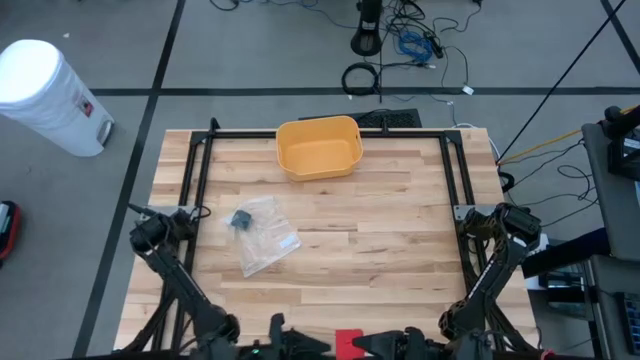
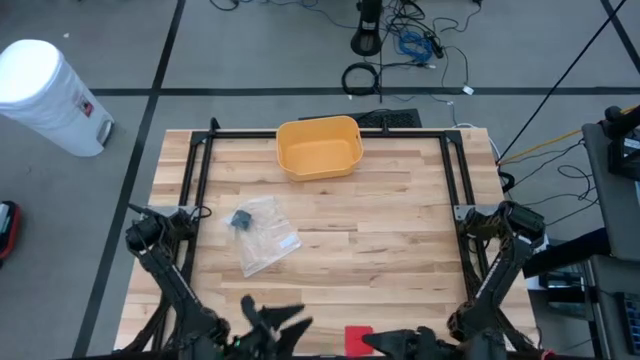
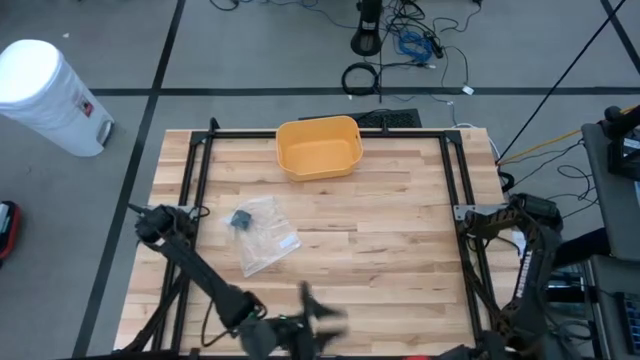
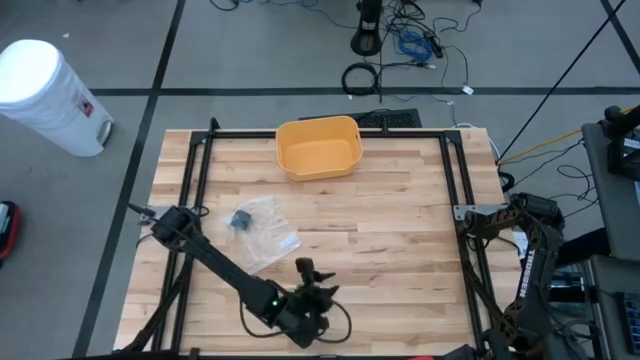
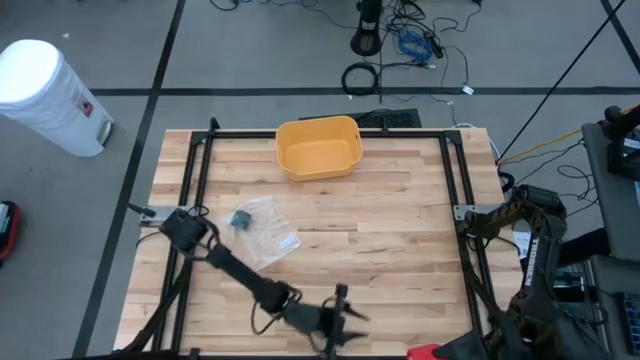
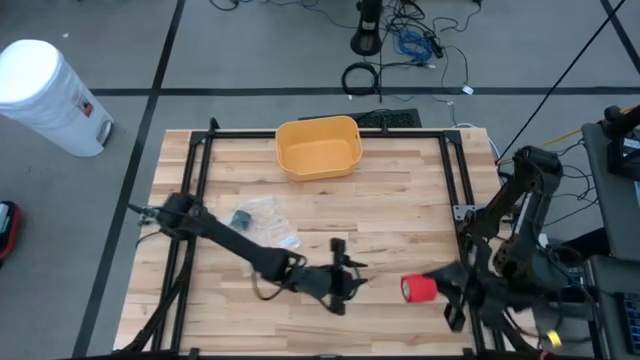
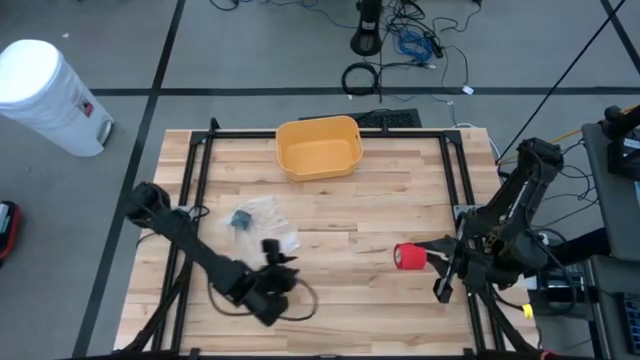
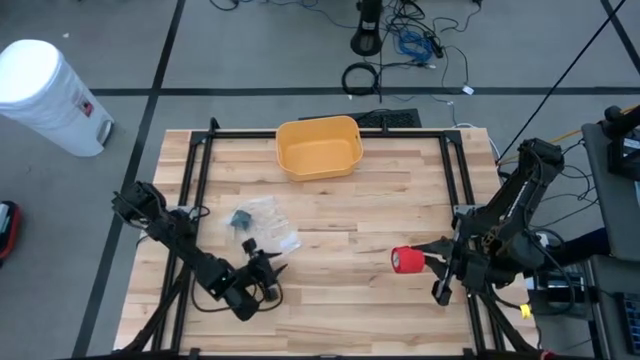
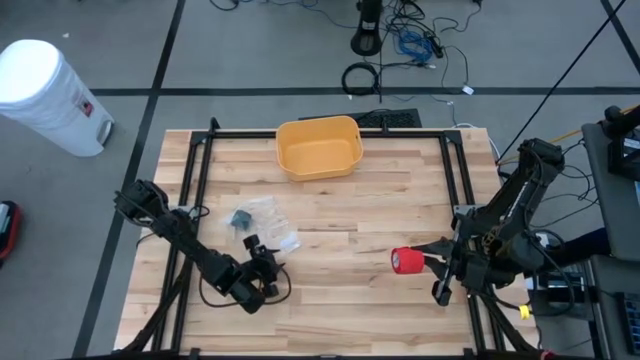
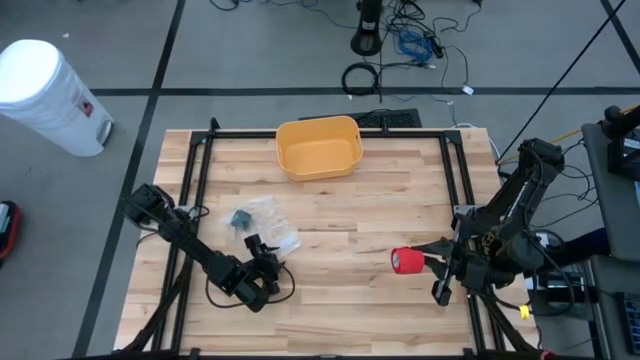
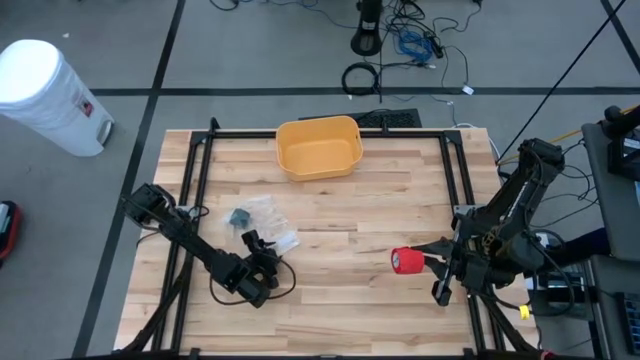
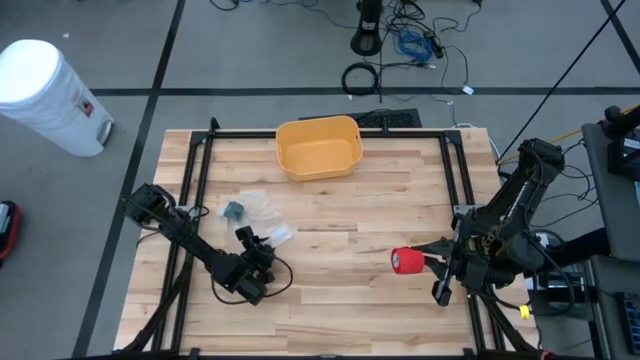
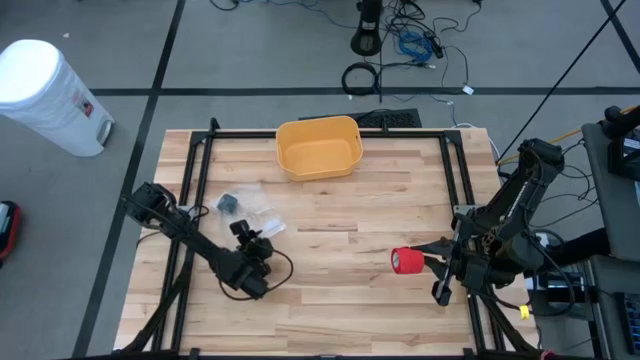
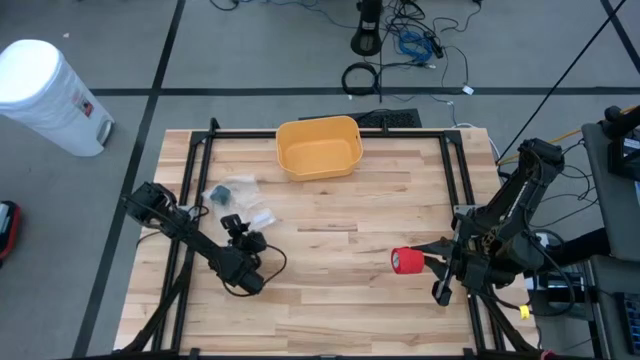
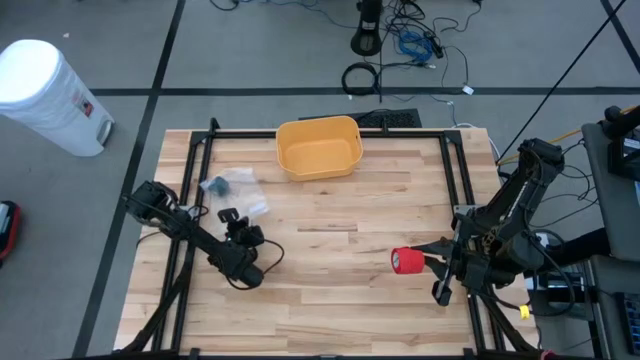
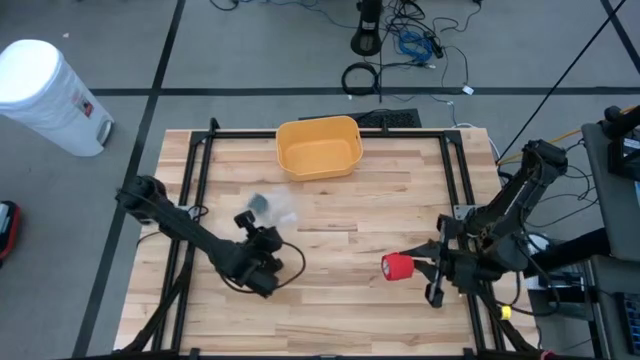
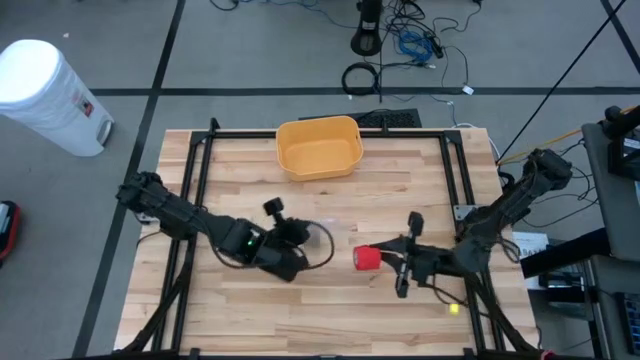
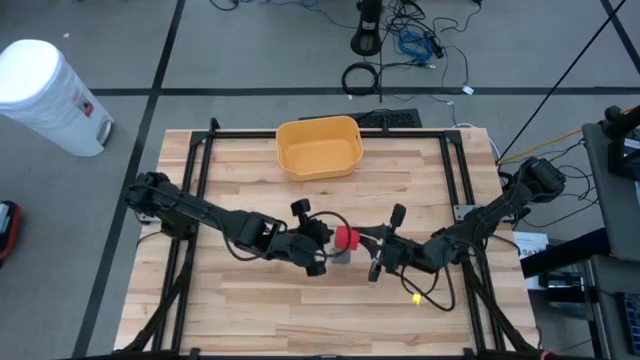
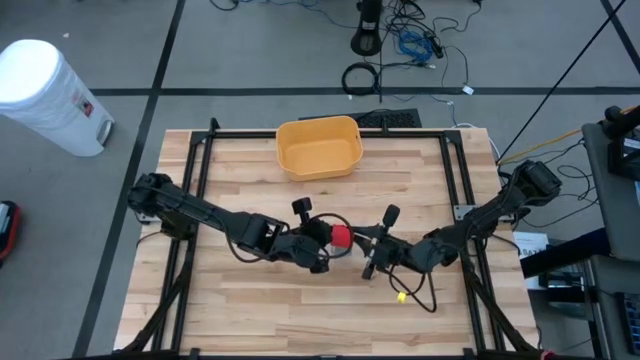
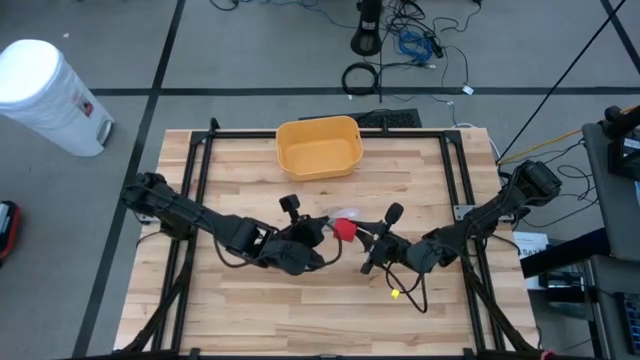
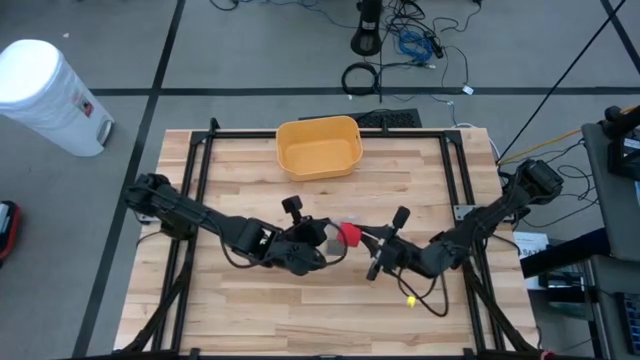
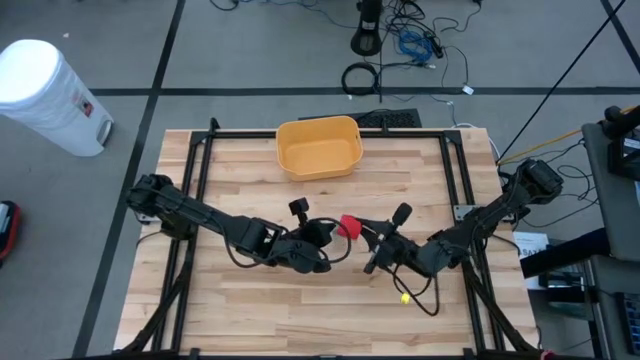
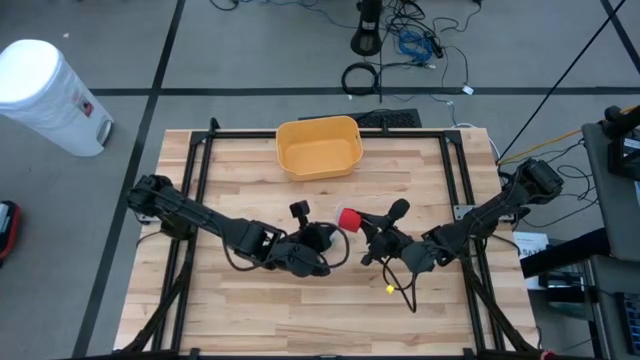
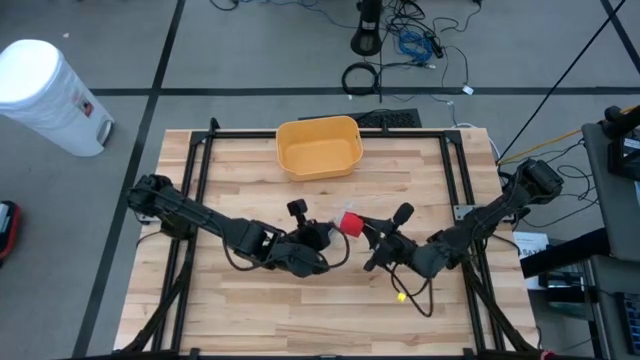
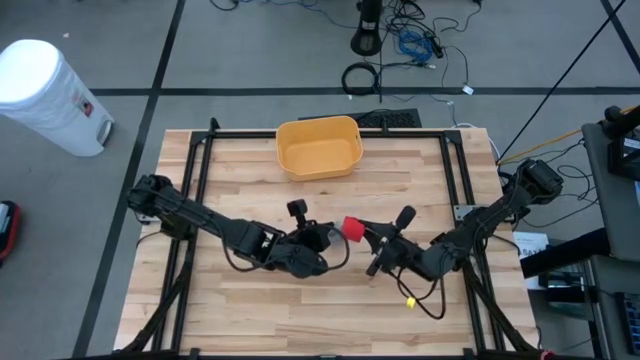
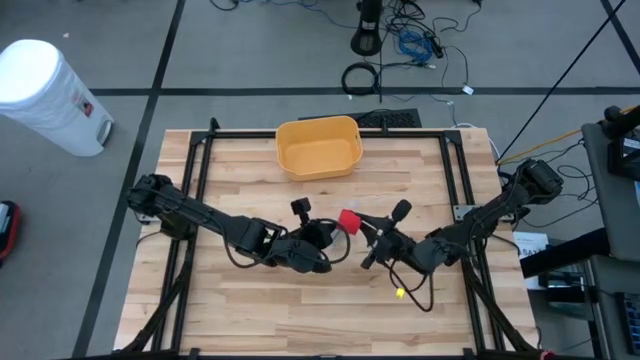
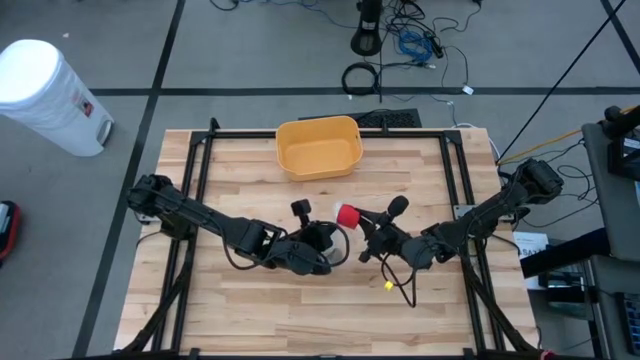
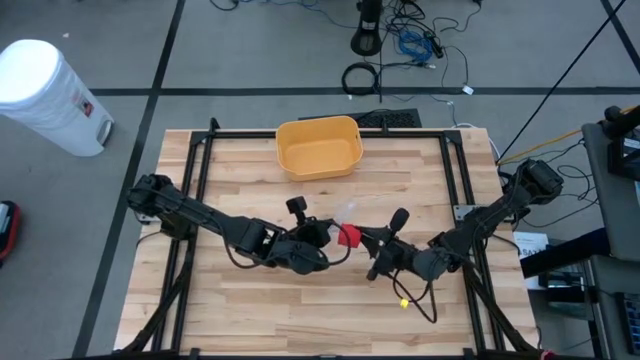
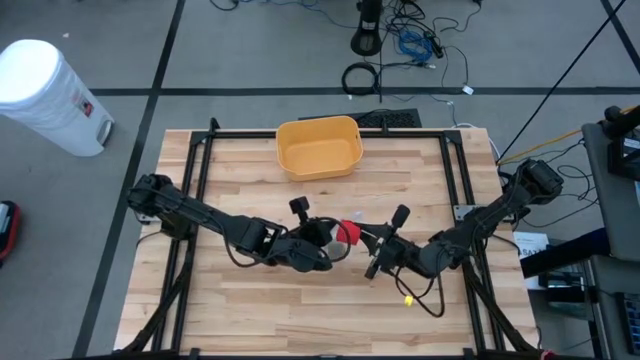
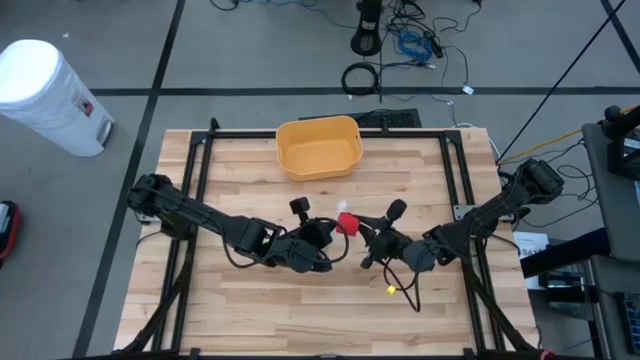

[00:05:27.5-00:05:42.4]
Task: Roll bandage
Put the rolled red bandage into the transparent zip bag

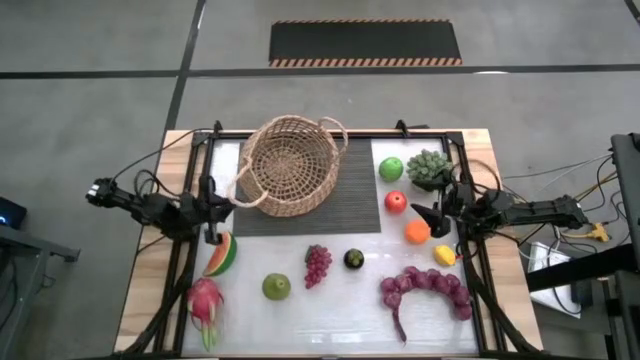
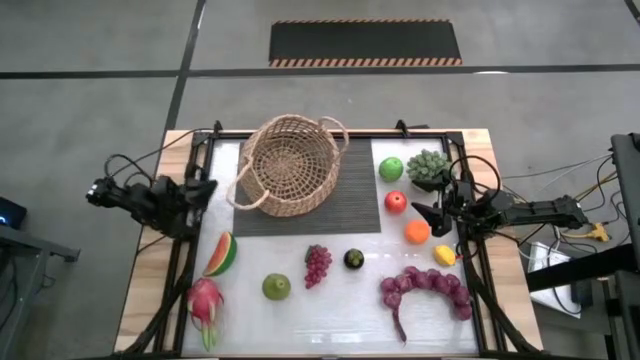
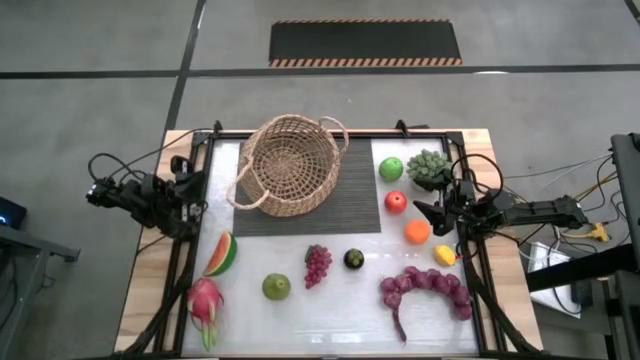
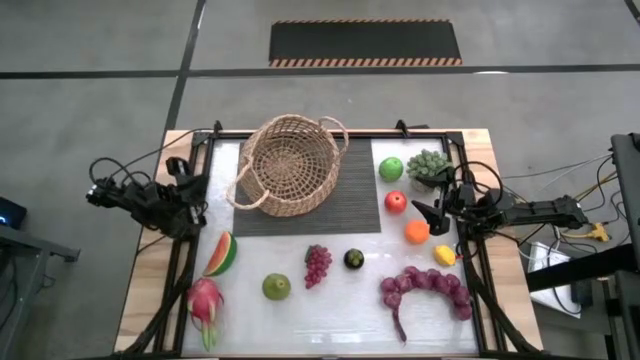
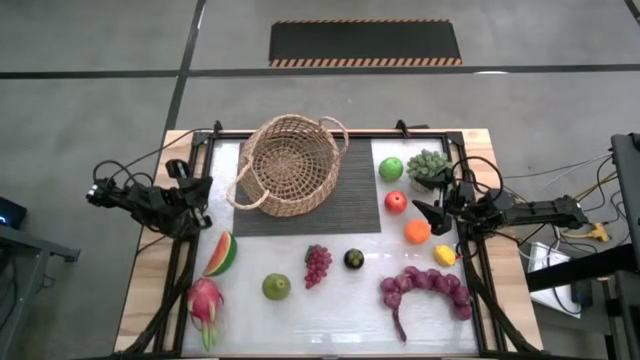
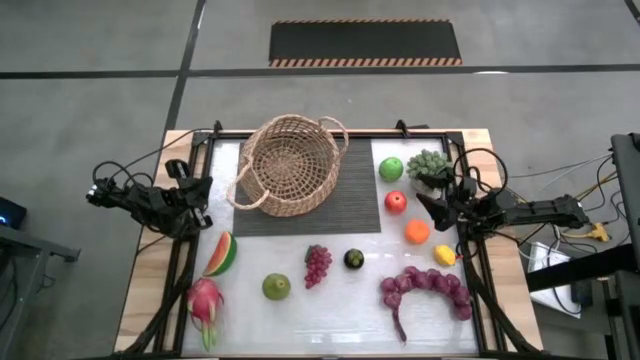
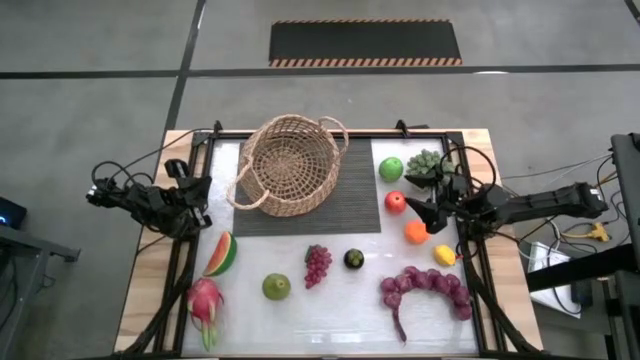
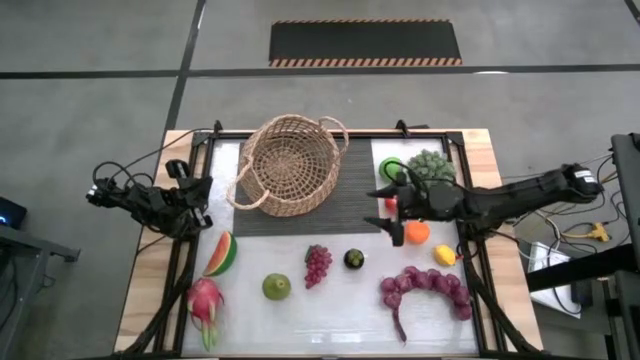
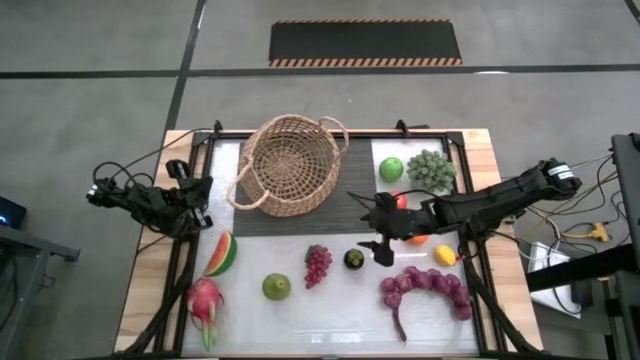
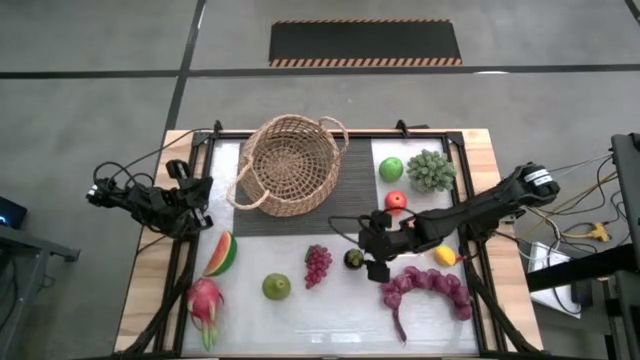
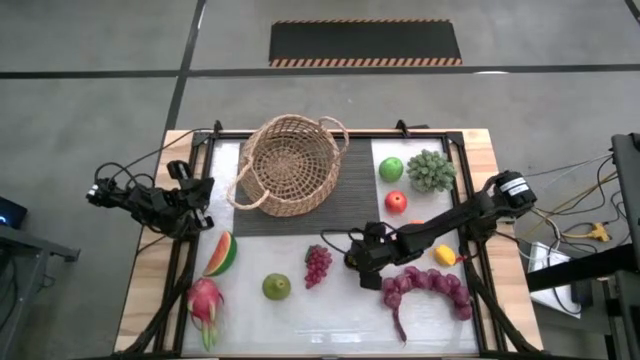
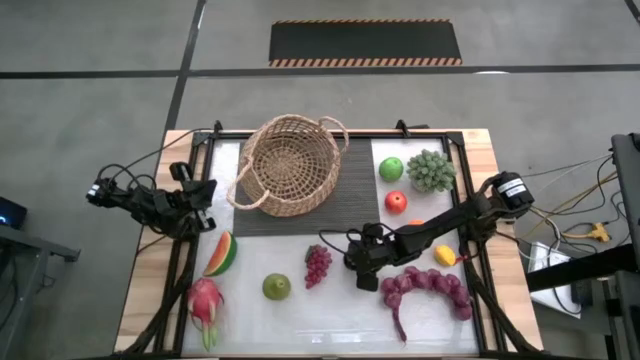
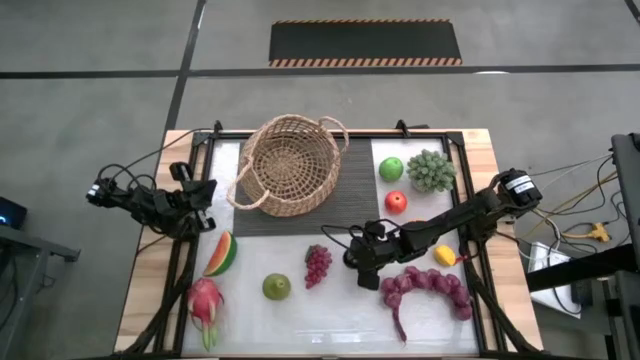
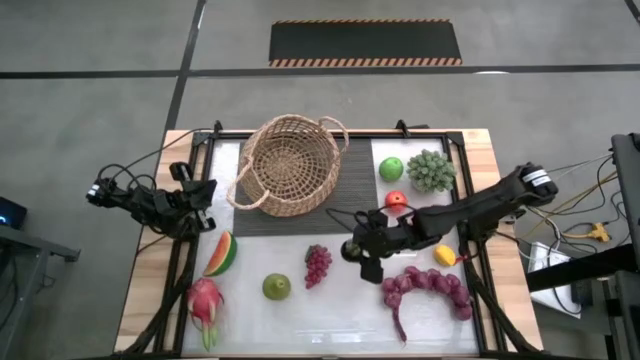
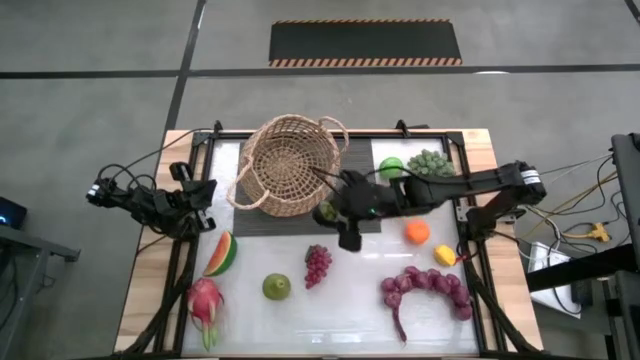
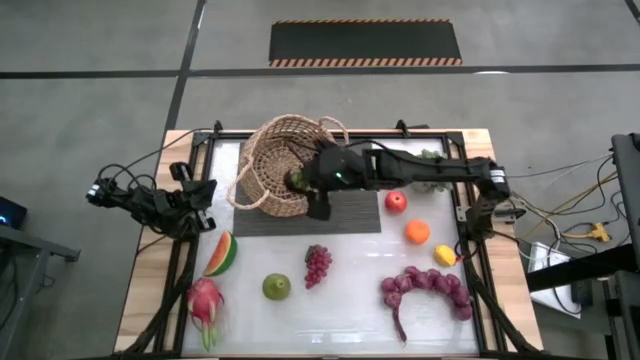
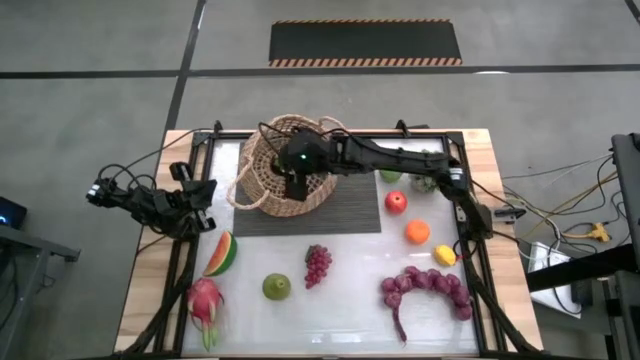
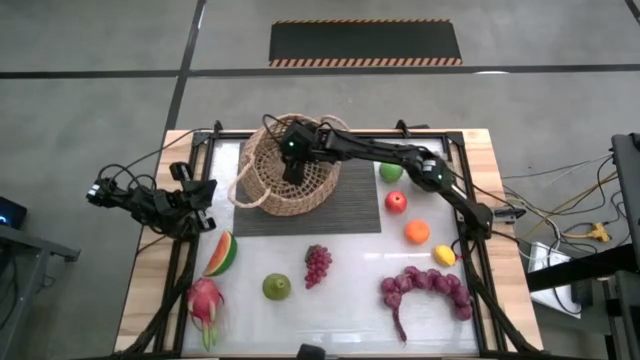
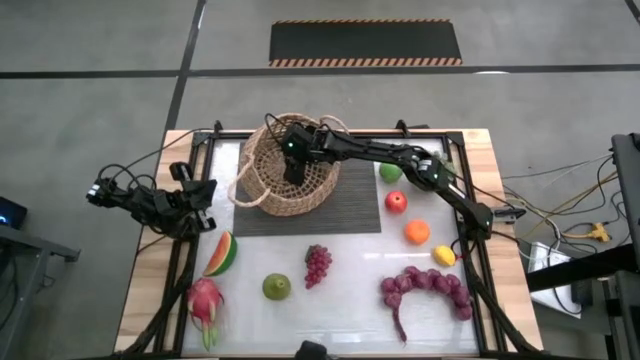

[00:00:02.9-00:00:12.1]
Task: Build produce basket
Put the purple mangosteen into the basket
